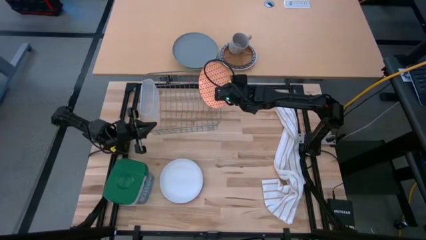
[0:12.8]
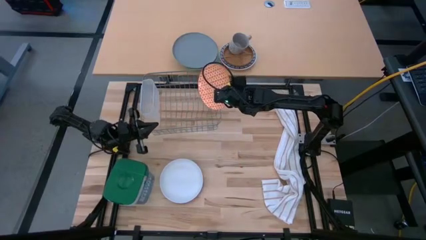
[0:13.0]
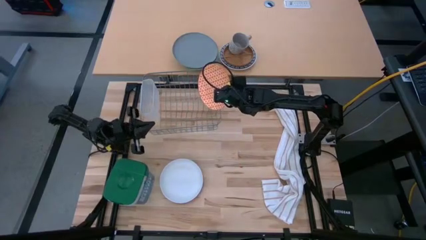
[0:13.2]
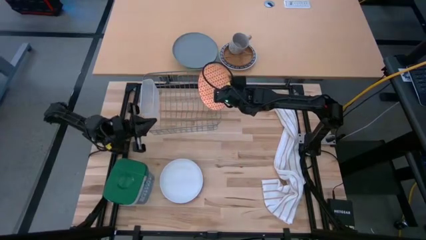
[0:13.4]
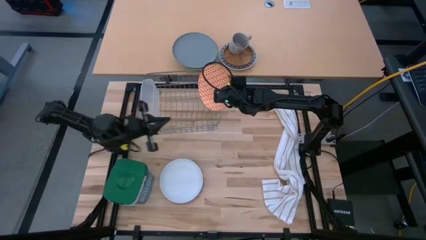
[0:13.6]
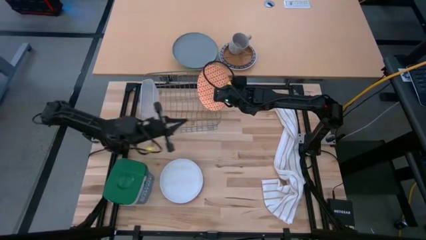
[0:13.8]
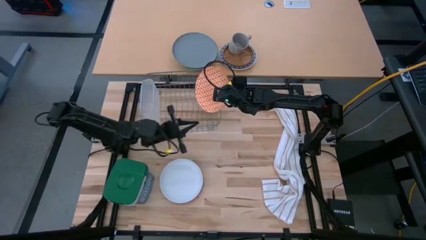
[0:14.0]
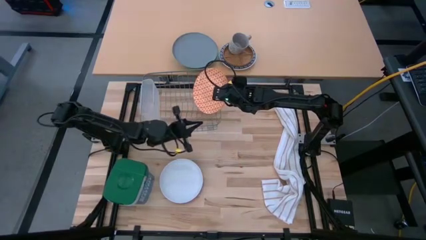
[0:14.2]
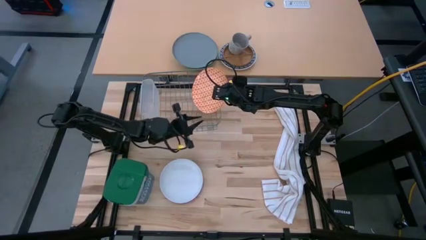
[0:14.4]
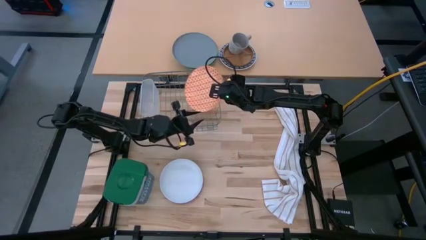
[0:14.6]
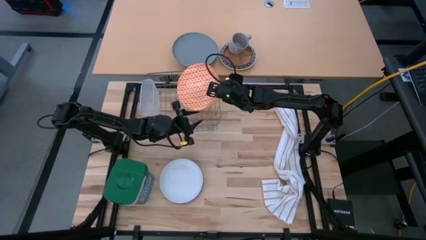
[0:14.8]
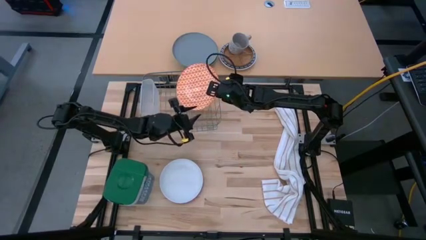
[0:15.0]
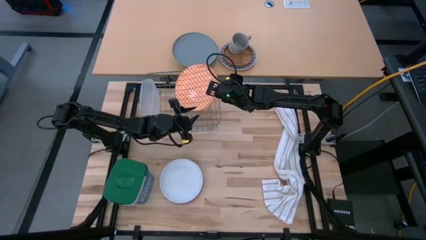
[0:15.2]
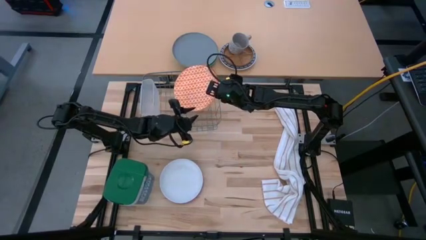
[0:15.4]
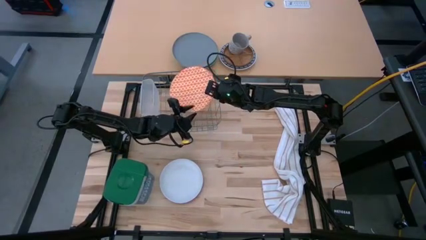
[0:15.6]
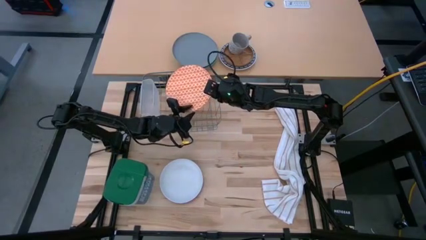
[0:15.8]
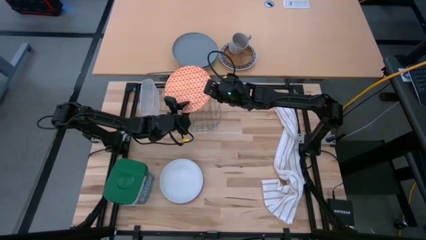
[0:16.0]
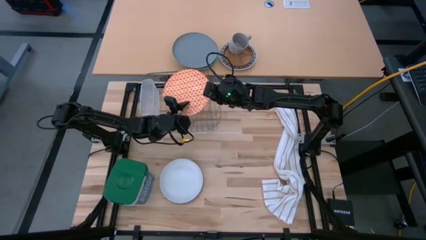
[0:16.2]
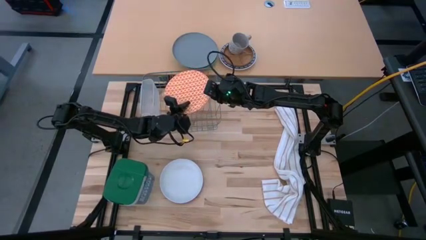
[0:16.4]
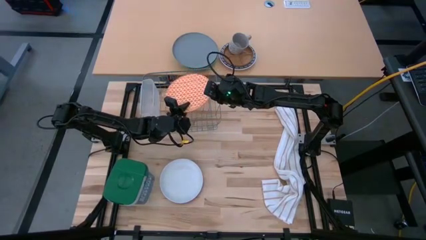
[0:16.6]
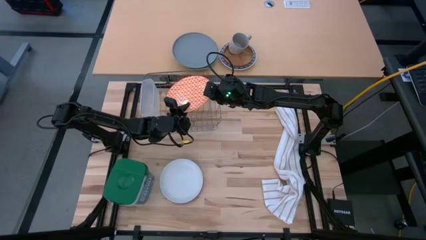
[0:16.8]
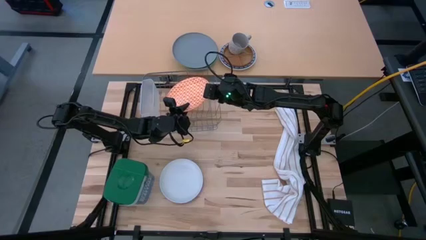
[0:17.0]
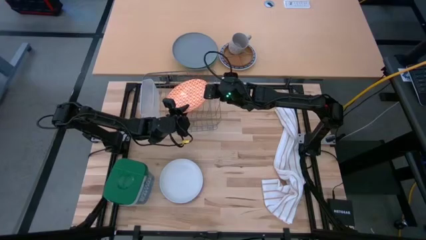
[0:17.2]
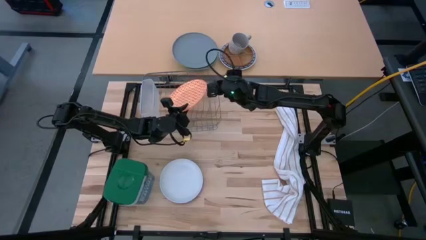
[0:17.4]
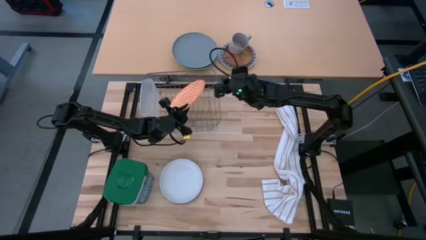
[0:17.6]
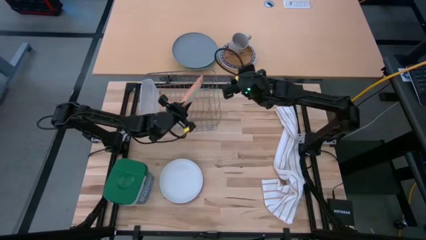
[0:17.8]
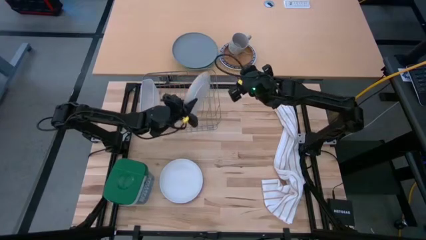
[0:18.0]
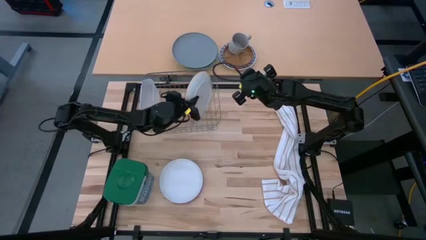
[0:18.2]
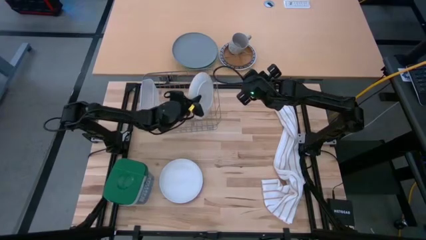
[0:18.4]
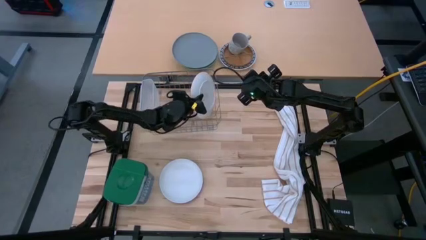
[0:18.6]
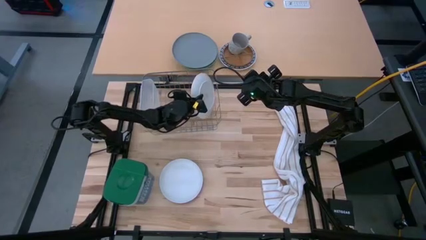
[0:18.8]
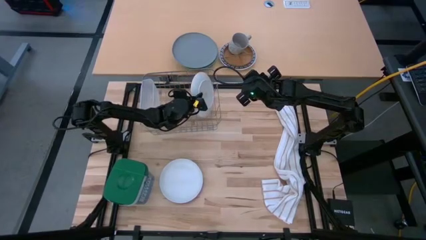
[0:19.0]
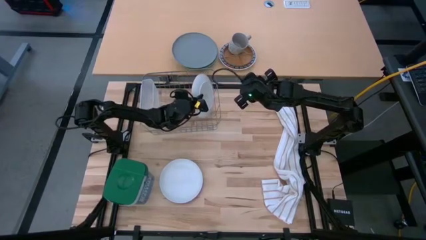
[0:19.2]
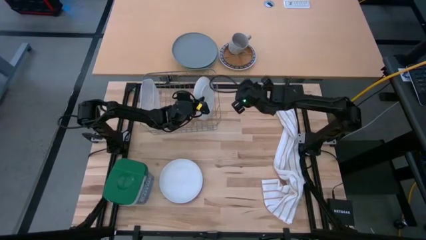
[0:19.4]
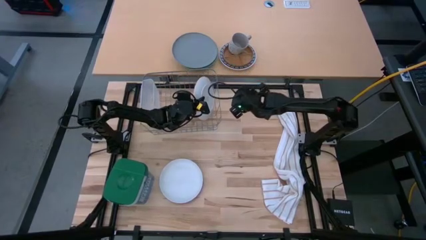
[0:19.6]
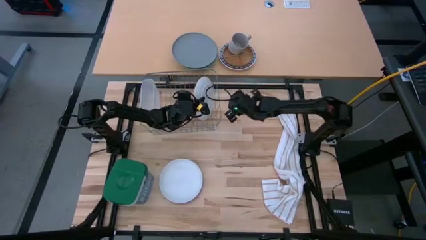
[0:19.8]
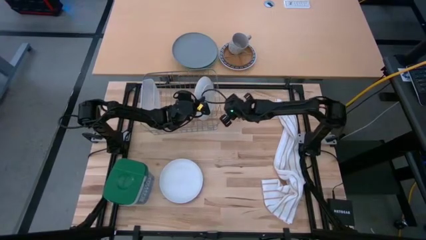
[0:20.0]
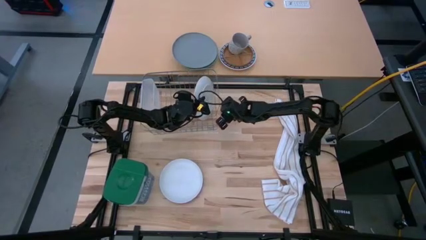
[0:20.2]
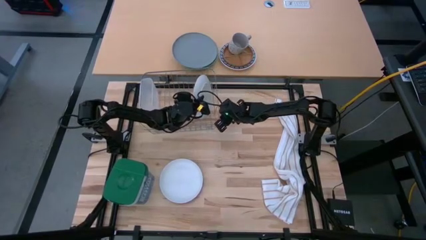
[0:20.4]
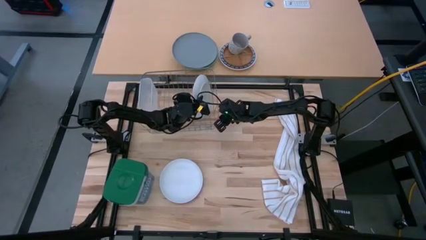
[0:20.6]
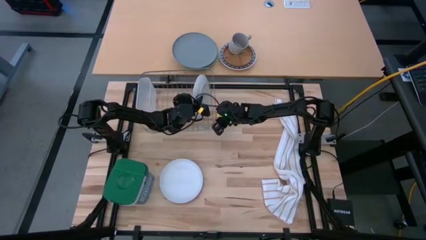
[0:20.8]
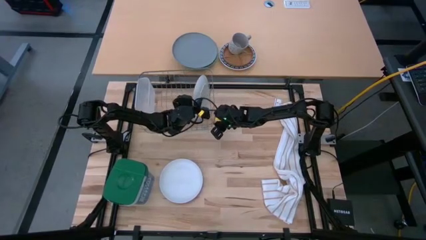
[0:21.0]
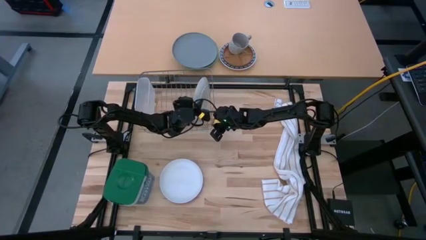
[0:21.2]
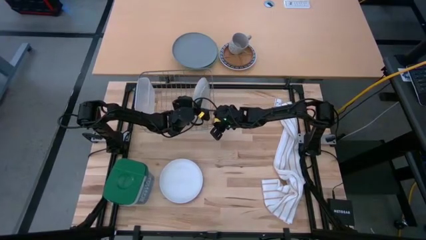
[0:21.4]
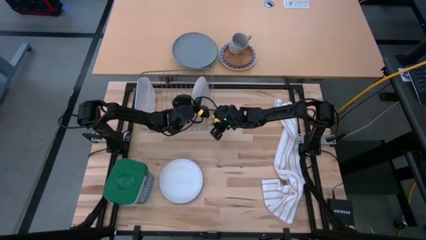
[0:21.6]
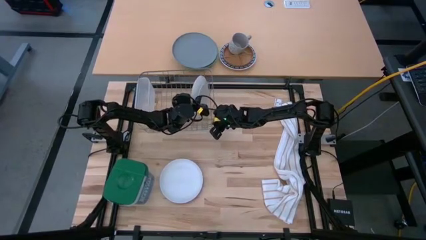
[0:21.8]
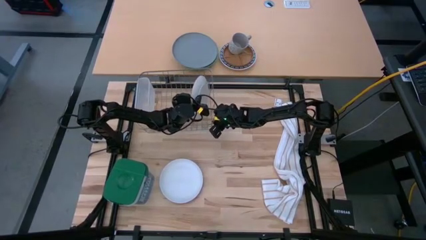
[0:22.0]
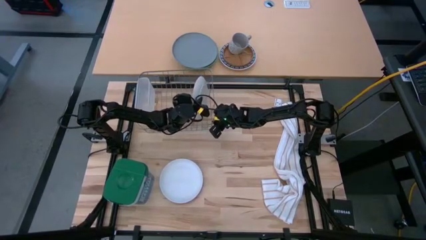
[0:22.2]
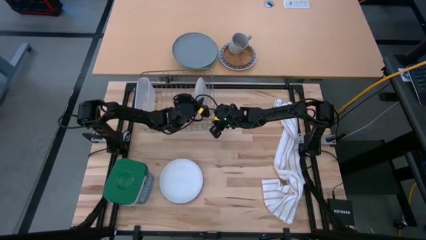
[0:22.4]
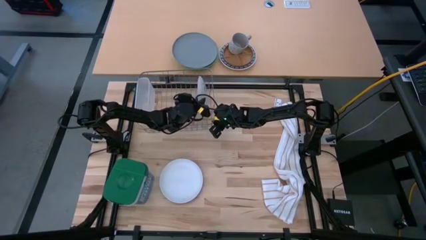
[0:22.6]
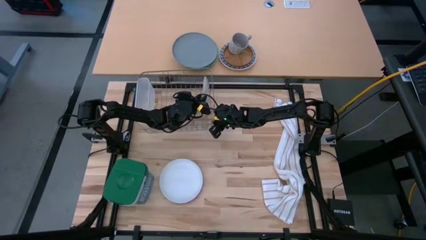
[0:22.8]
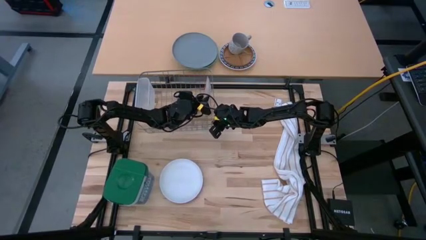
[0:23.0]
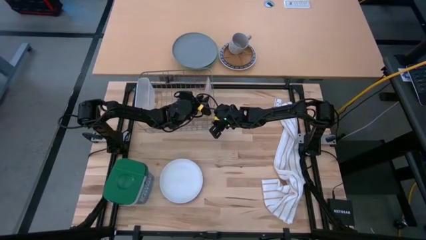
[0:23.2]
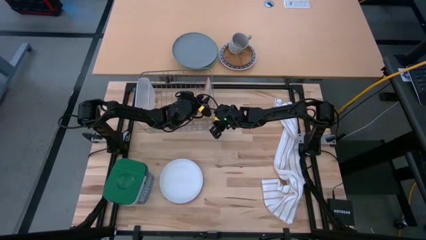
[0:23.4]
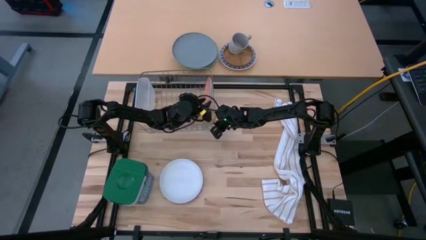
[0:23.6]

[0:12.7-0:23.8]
Task: Sort dishes
Put the orange patterned plate into the dish rack
